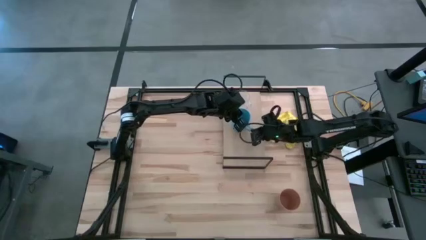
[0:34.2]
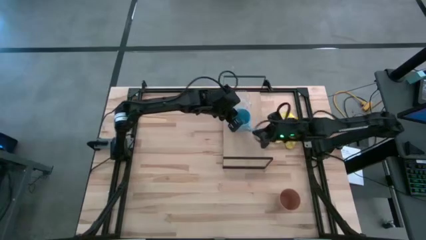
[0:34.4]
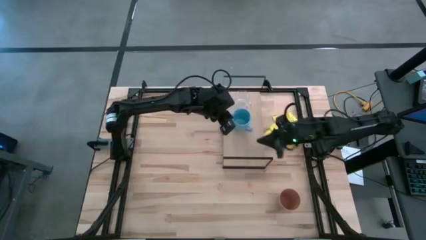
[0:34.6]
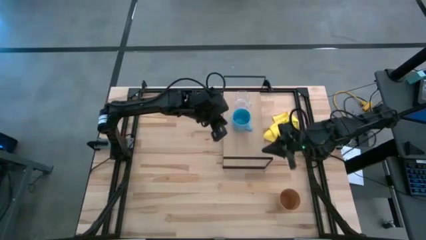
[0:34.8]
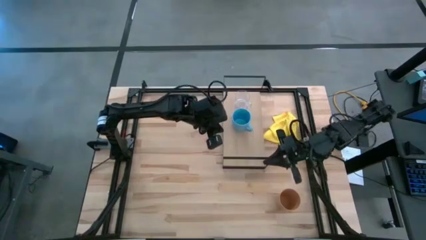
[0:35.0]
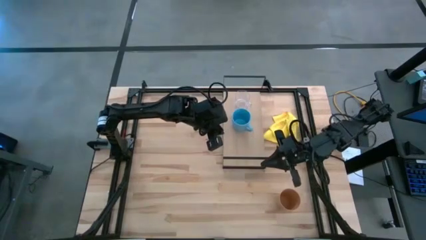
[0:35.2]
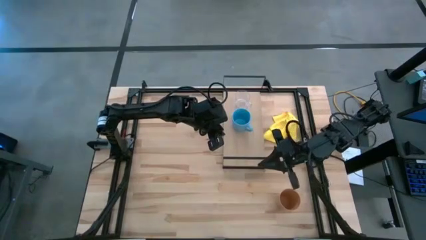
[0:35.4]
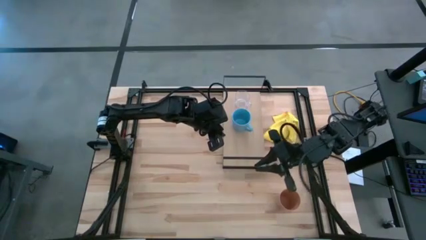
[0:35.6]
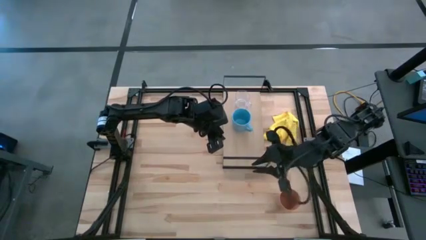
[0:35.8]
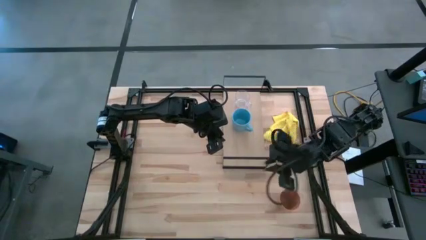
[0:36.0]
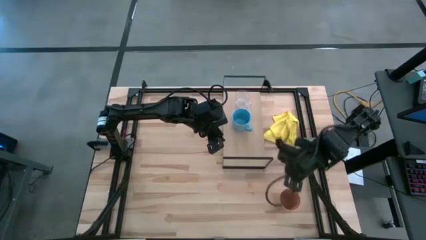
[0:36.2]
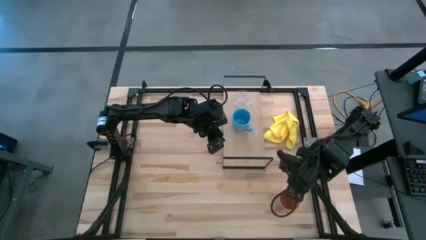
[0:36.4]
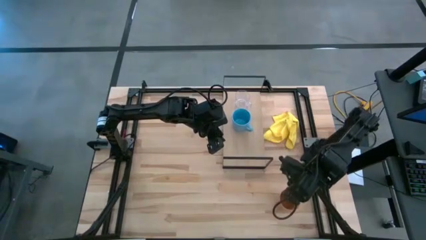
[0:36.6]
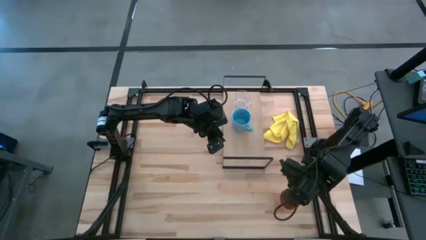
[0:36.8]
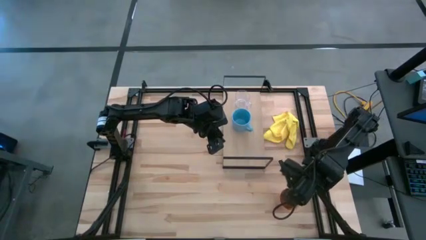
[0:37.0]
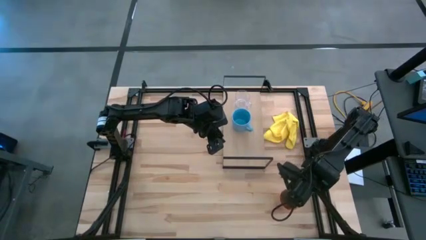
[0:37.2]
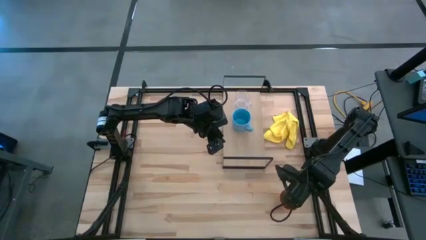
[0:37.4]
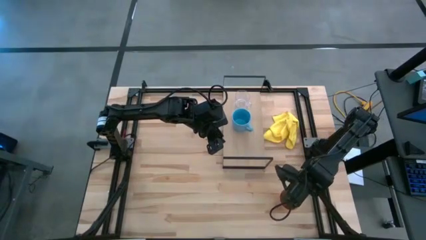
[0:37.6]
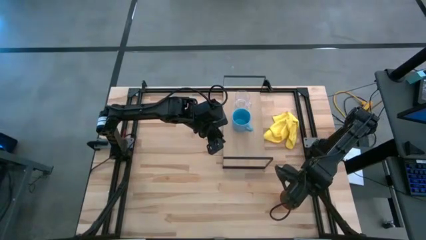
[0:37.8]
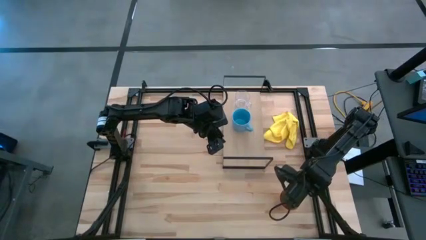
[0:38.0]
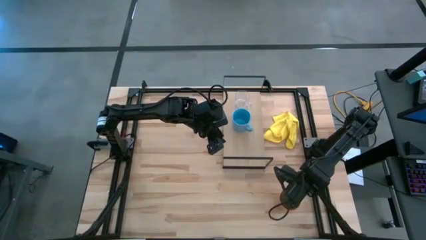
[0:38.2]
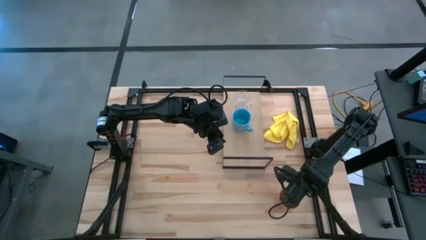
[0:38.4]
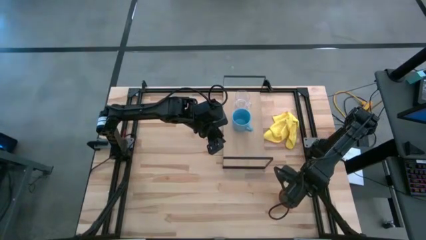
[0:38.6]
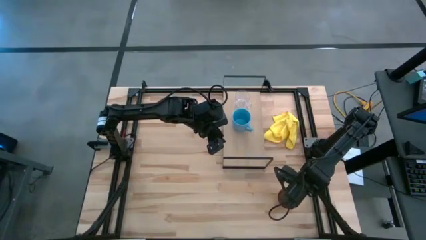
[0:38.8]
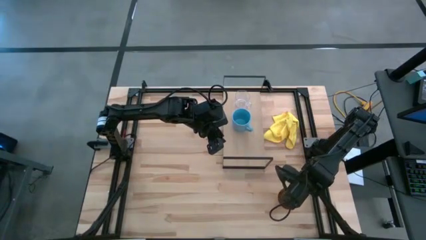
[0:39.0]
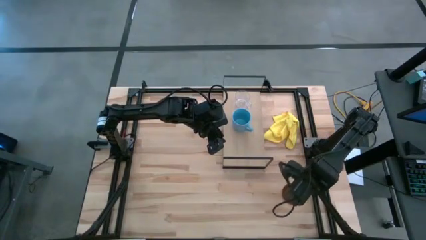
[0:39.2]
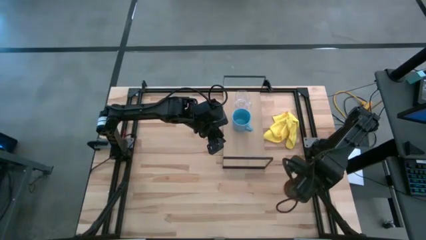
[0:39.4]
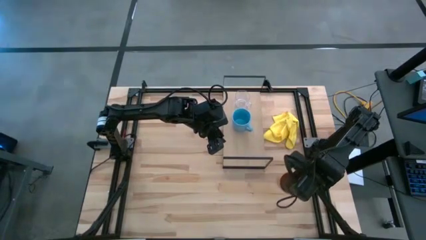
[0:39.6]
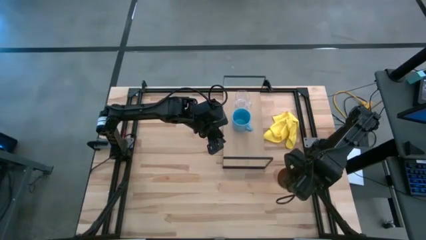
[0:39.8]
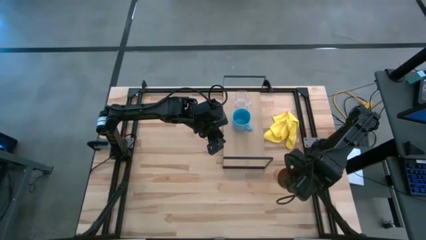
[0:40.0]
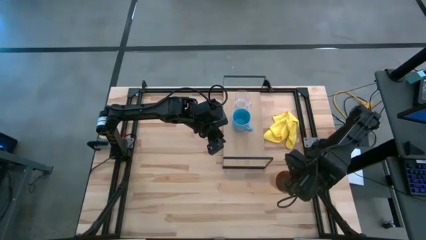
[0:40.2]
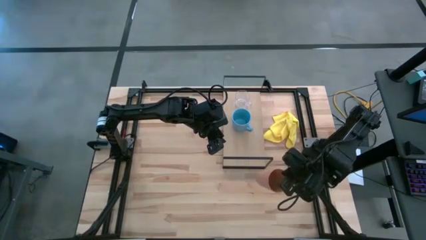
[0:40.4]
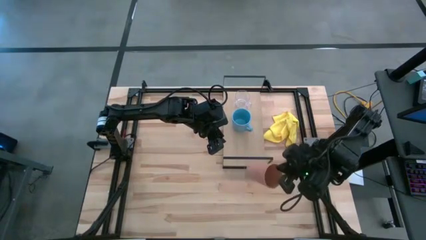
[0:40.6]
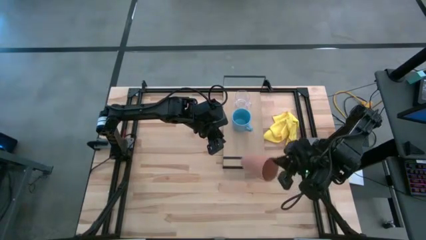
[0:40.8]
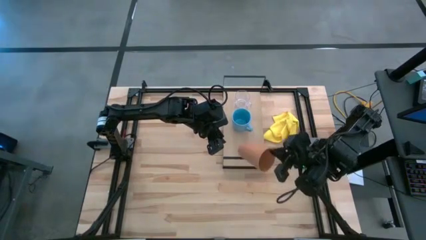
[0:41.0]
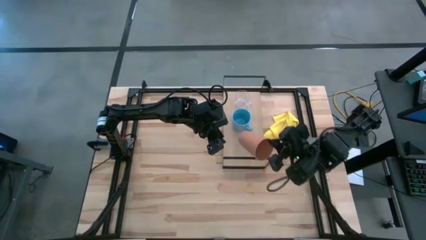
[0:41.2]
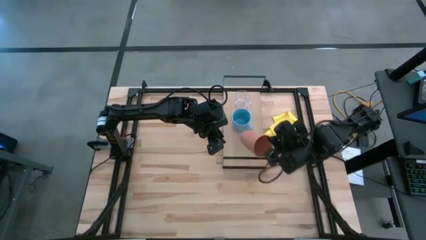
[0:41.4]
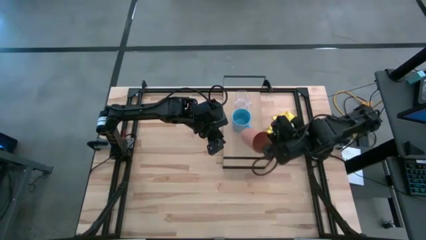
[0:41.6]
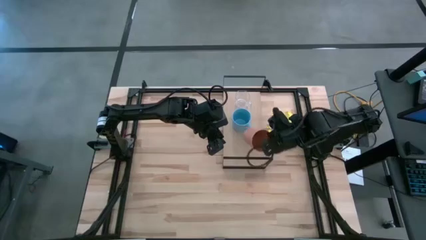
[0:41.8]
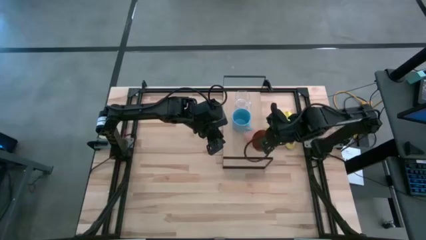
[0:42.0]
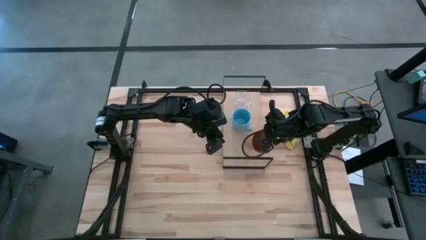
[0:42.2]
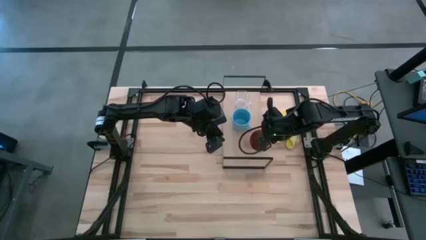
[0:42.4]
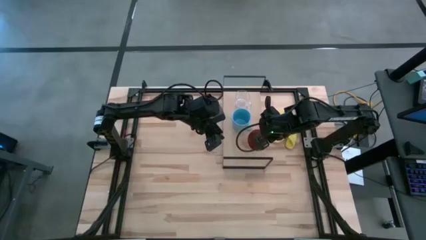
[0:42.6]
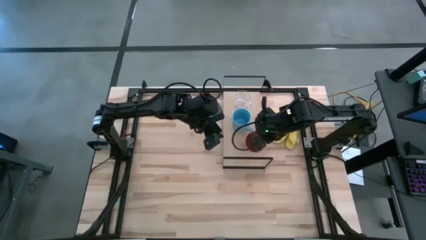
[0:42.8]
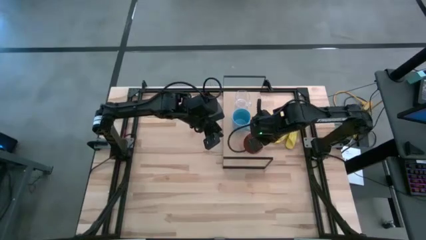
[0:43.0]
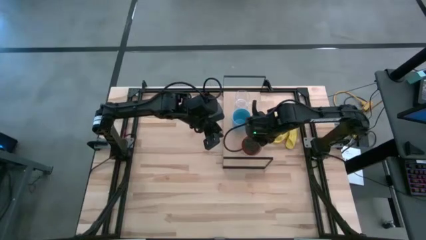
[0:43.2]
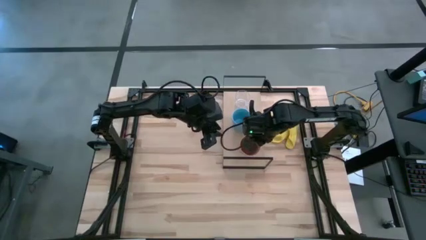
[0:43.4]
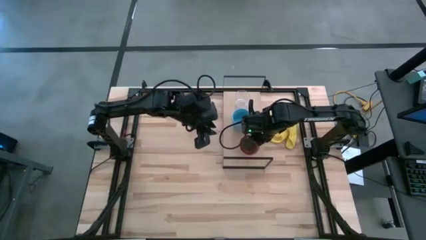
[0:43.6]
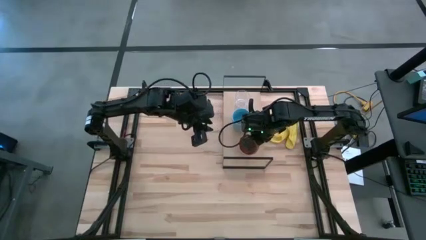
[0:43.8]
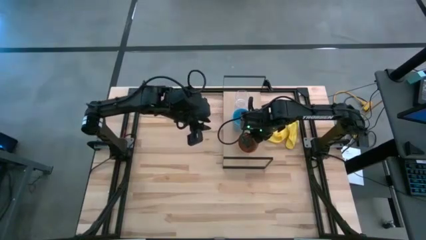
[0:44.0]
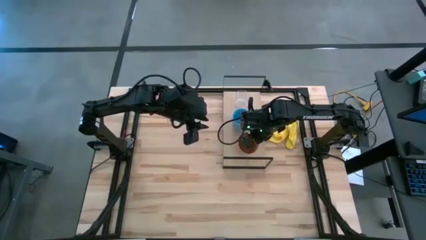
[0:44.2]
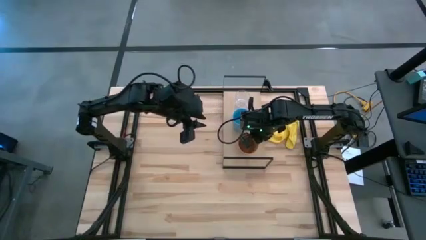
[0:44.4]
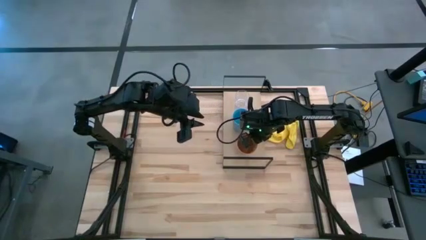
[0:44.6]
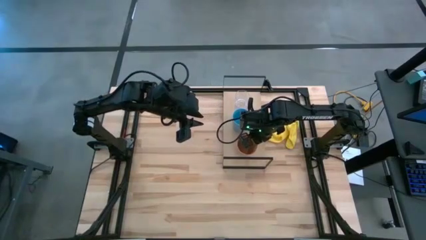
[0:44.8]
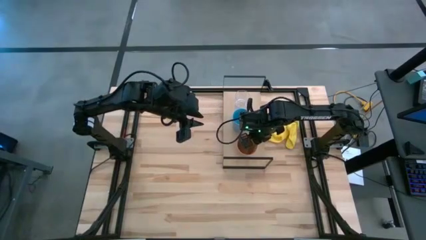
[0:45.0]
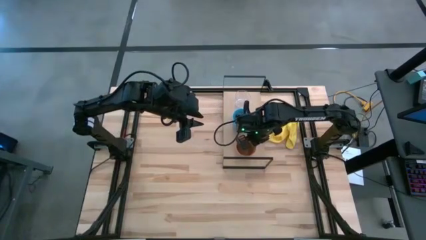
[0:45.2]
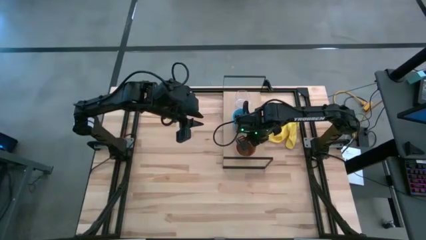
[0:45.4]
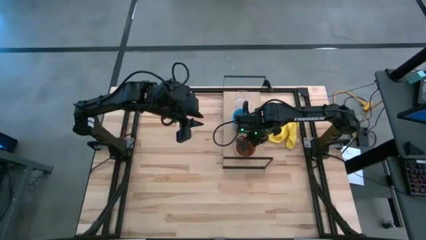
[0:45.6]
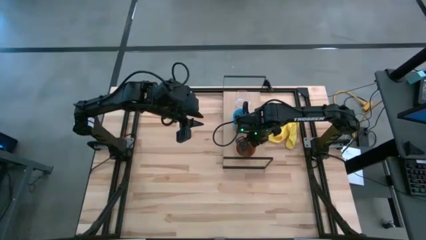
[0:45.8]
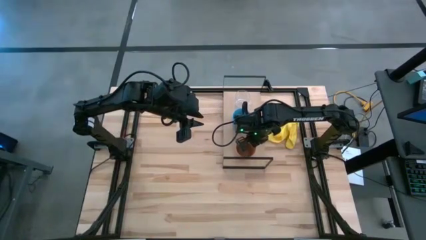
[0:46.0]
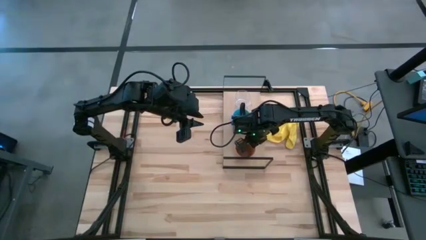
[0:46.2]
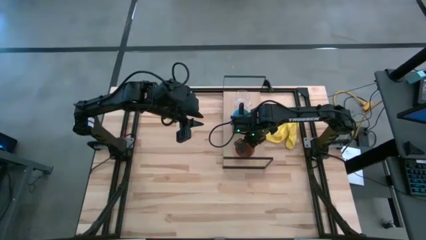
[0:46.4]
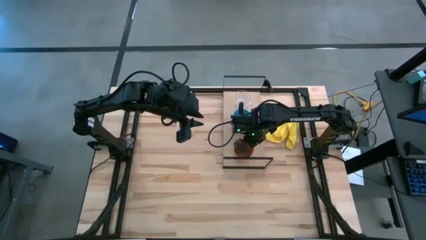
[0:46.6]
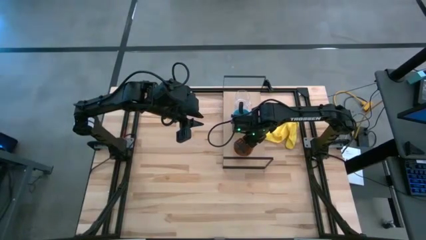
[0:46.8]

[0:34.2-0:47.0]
Task: Stack small to large cups/mugs on shelf
Put the brown cup on the shelf
